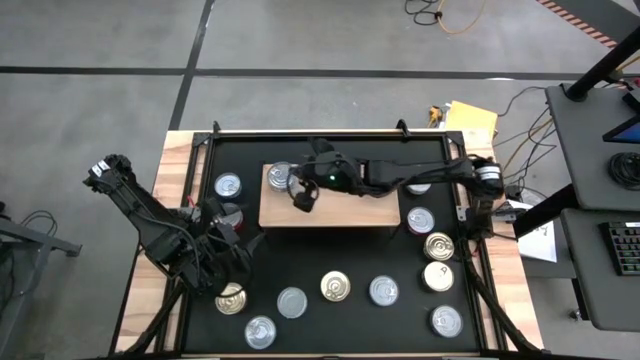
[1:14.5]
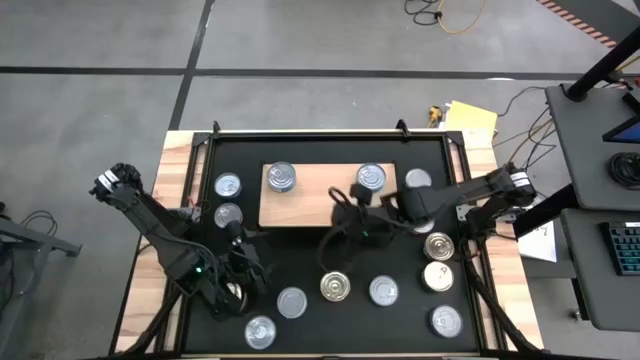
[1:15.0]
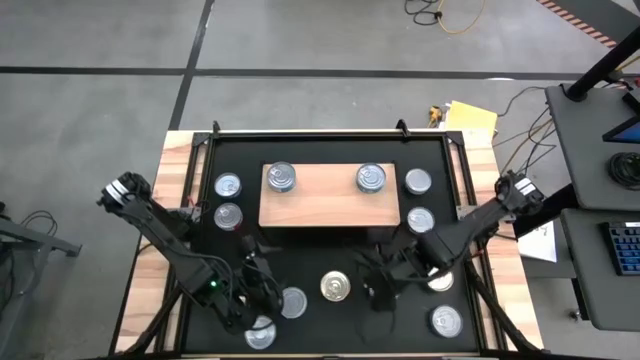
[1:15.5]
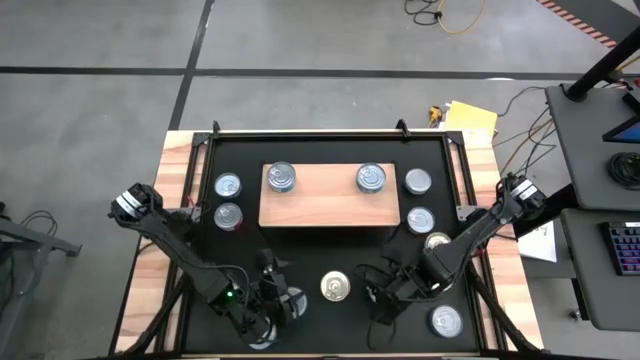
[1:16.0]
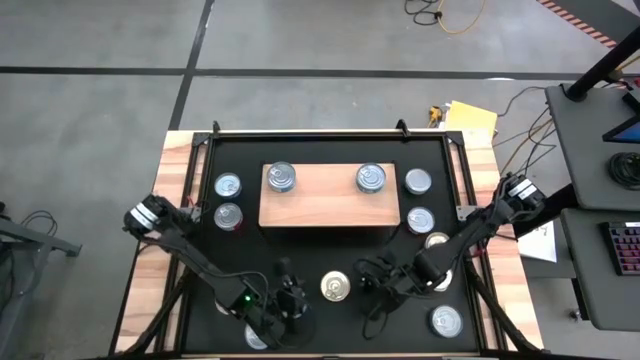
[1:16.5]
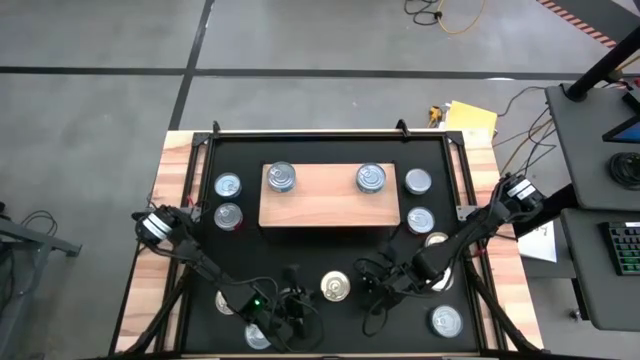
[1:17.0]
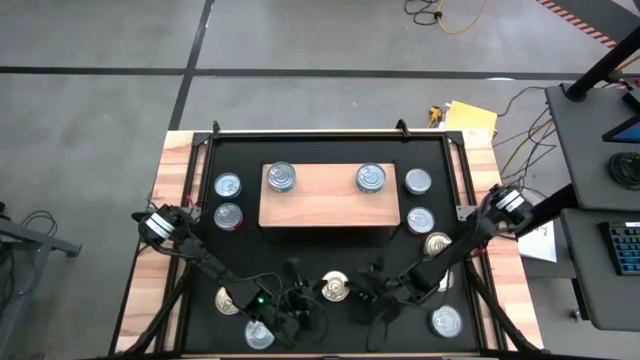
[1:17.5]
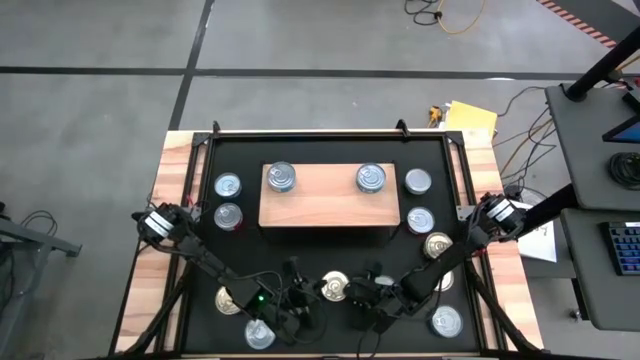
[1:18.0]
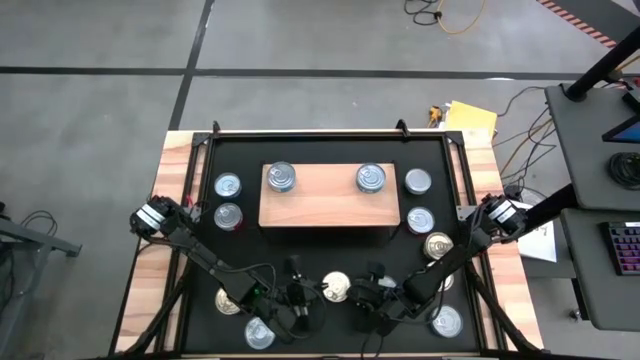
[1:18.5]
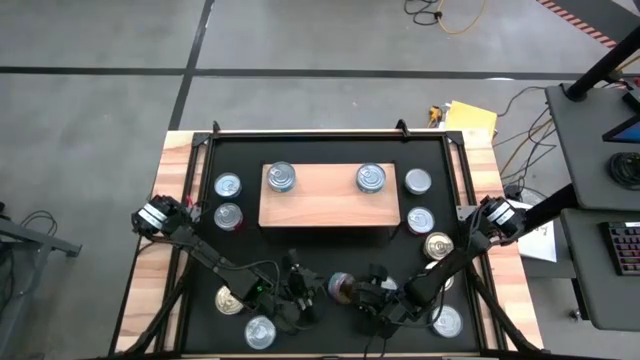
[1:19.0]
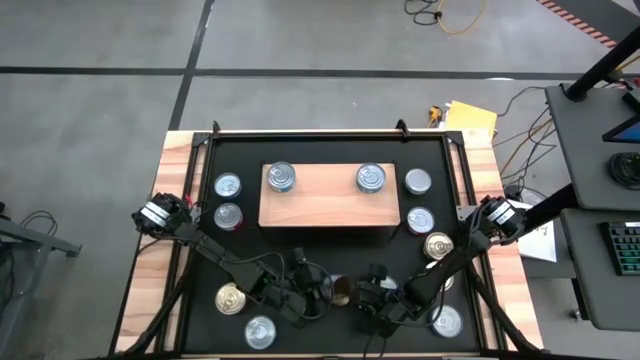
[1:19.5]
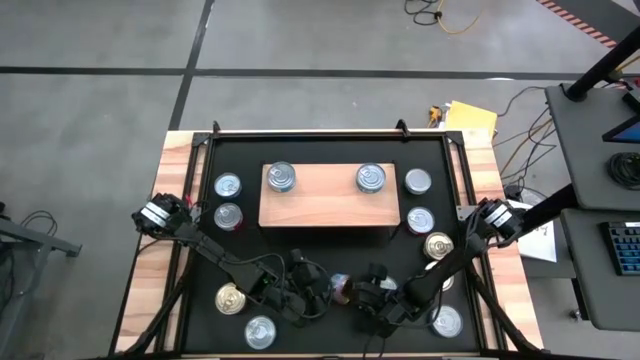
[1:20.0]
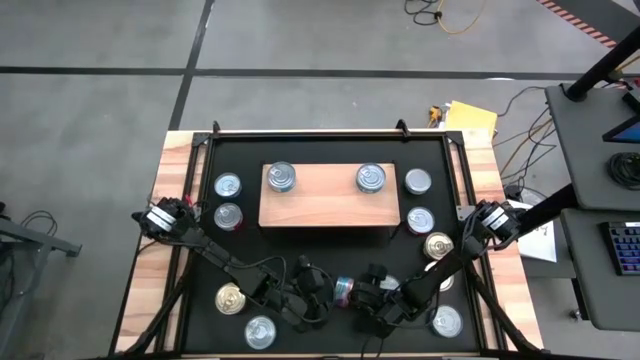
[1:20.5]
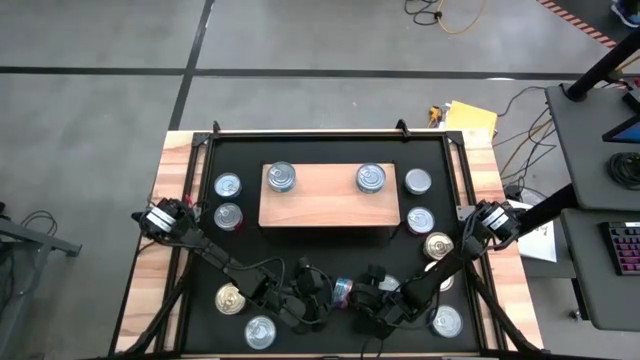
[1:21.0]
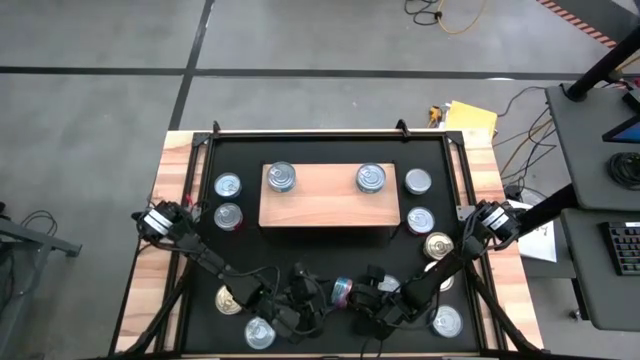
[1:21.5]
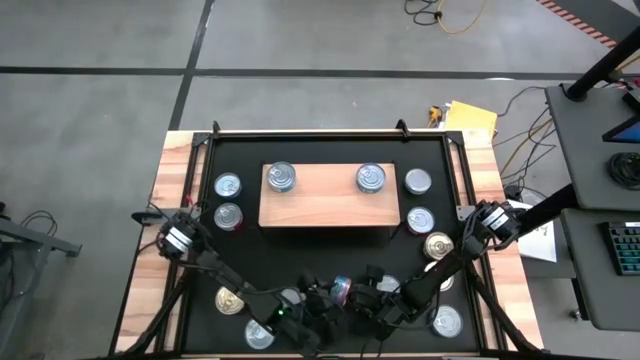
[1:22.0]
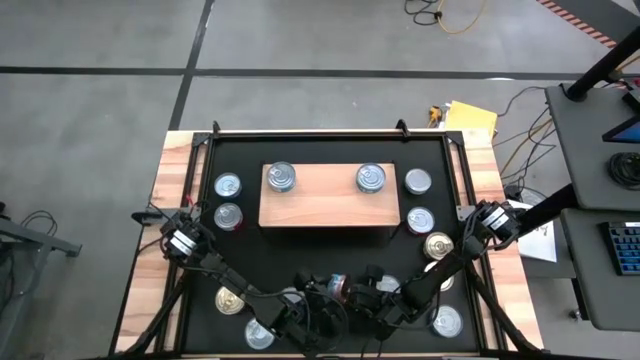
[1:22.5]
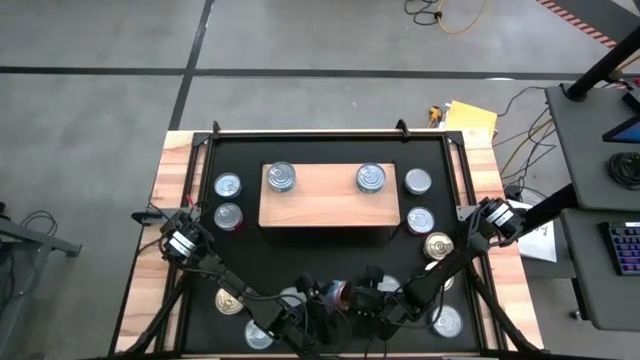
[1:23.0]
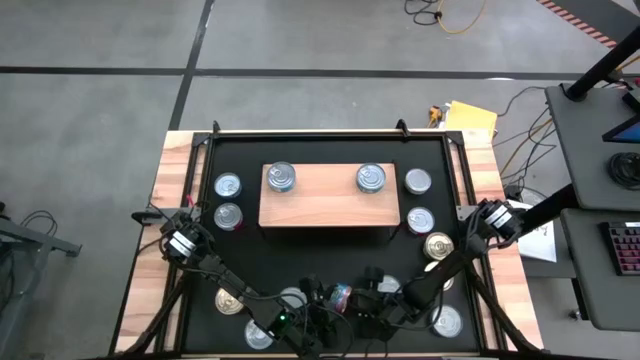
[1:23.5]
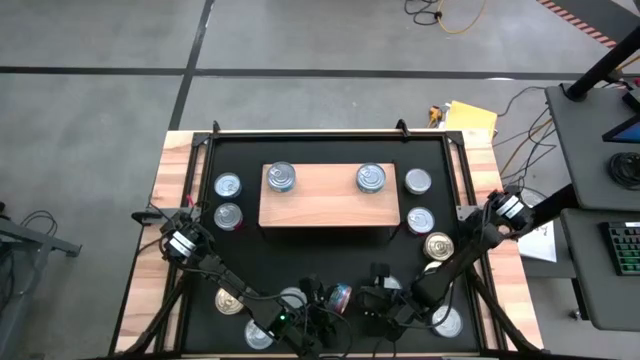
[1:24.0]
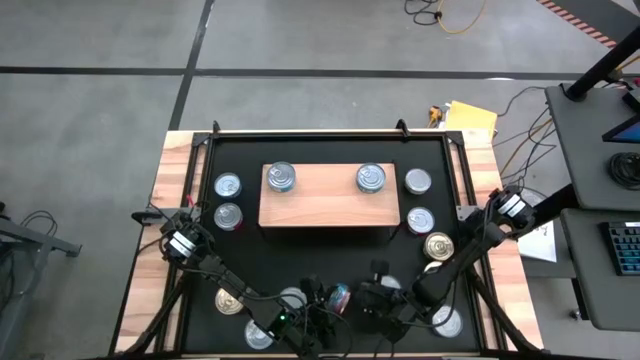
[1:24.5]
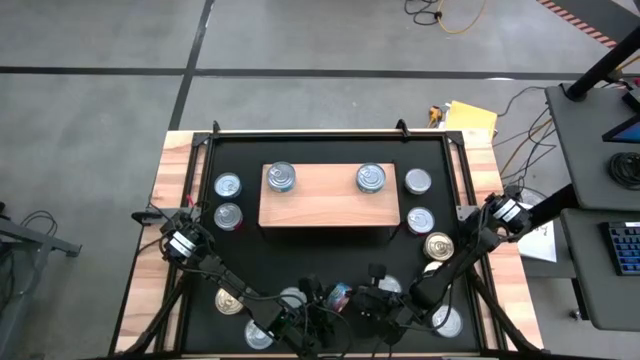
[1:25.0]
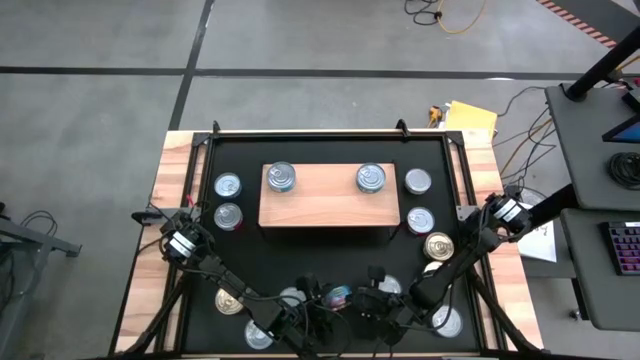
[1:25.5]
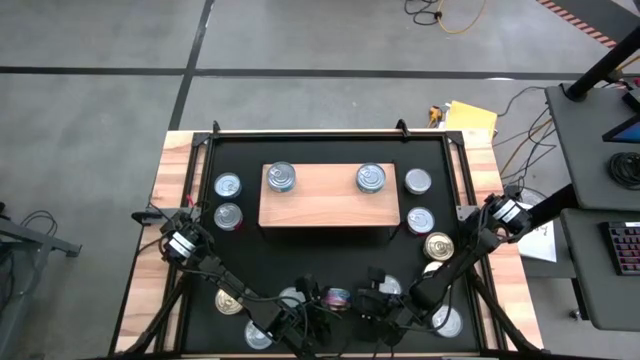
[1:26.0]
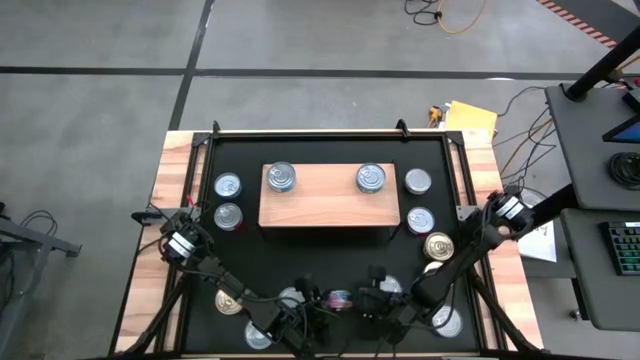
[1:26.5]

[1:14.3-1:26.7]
Task: Stack canned seafood by type on shelf
Put the blue tuna can on the shelf

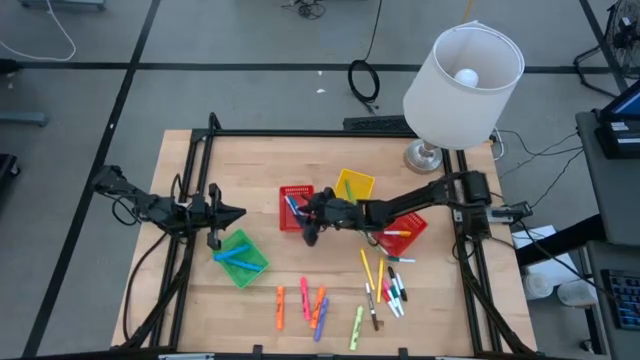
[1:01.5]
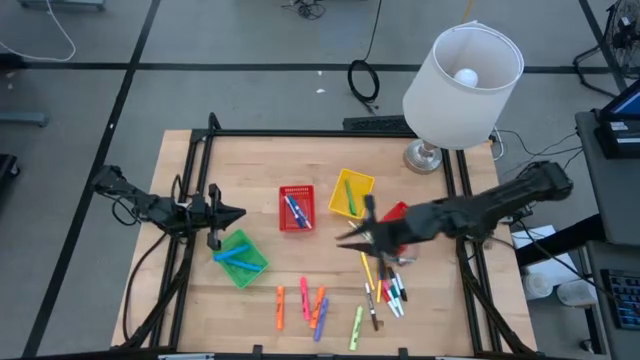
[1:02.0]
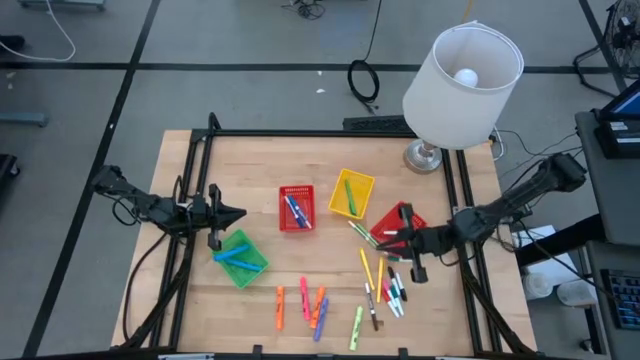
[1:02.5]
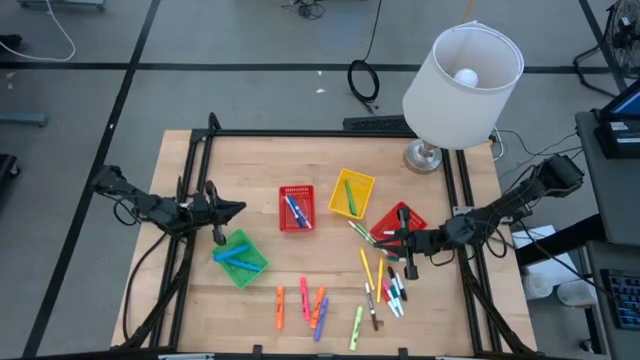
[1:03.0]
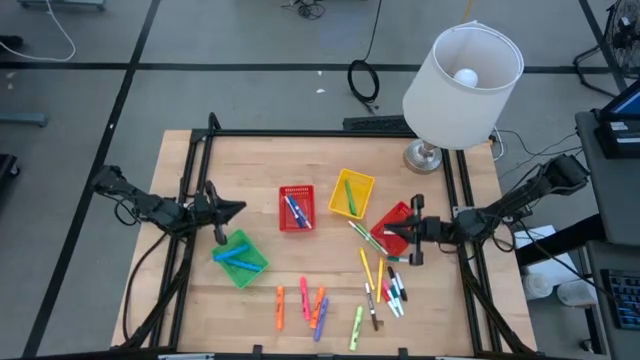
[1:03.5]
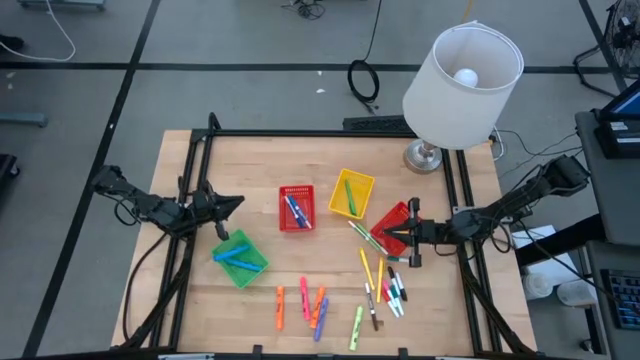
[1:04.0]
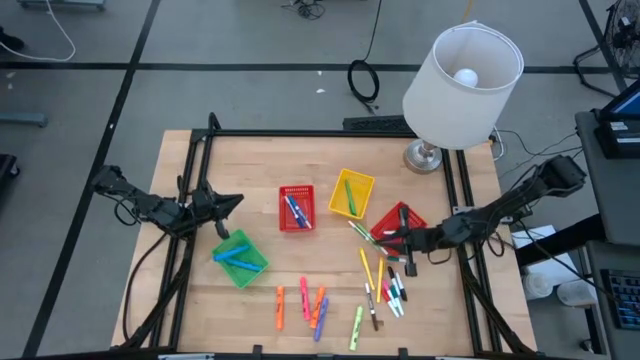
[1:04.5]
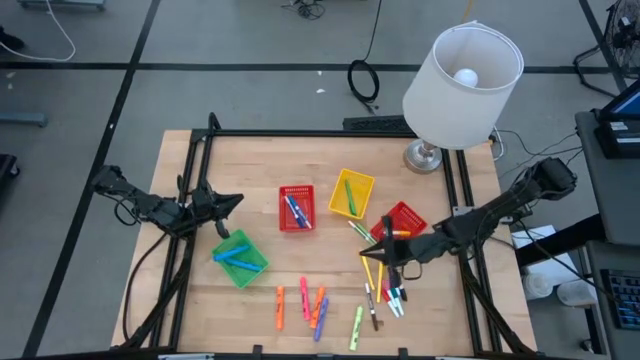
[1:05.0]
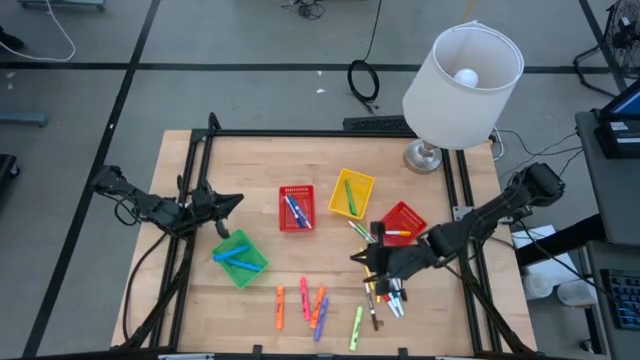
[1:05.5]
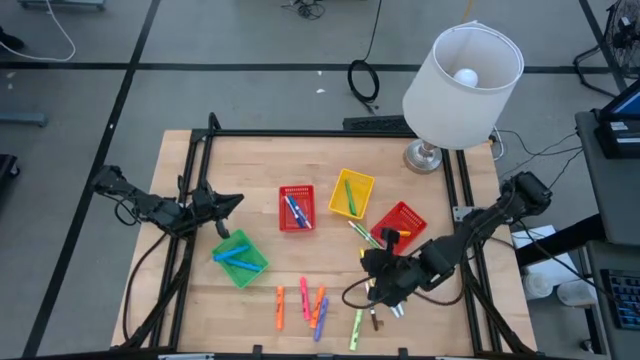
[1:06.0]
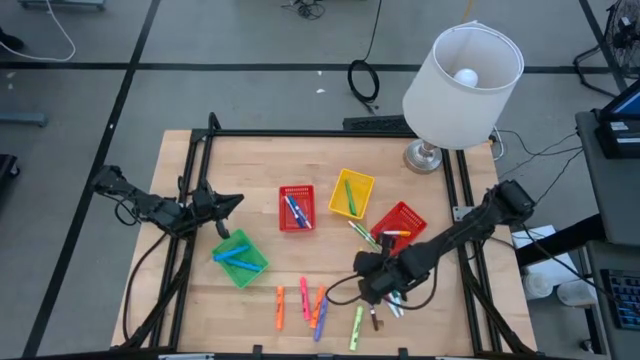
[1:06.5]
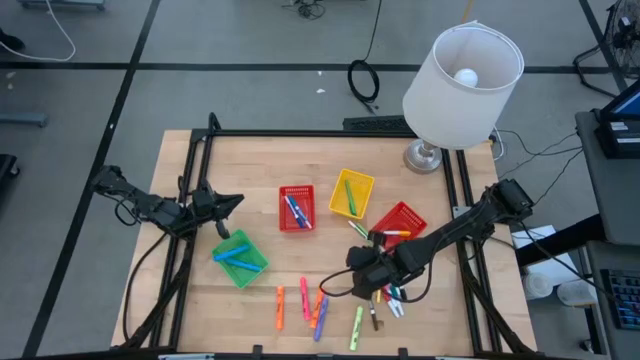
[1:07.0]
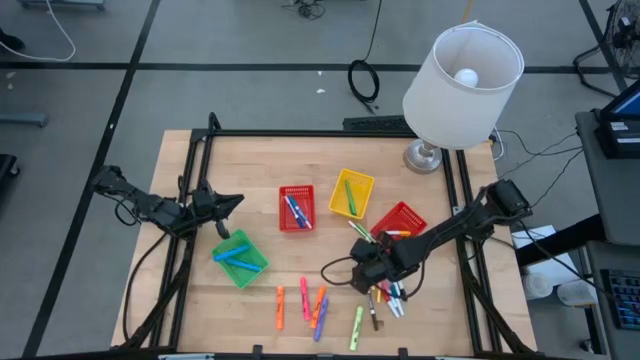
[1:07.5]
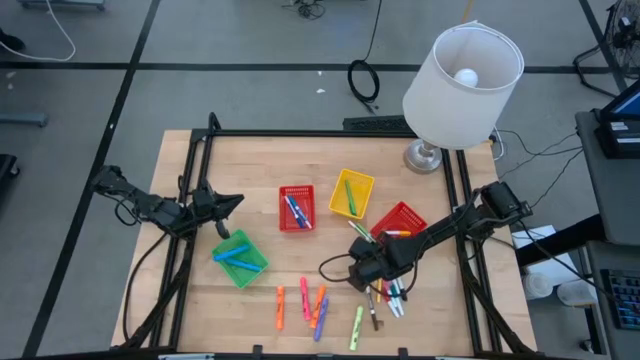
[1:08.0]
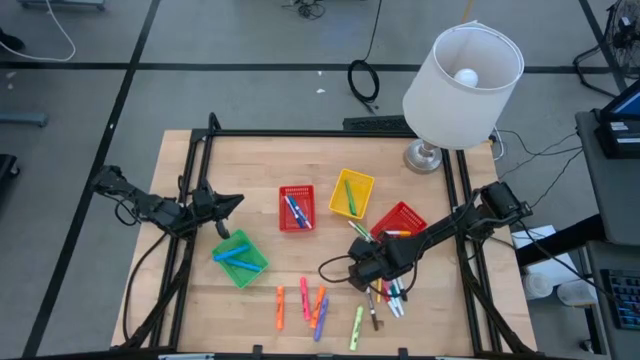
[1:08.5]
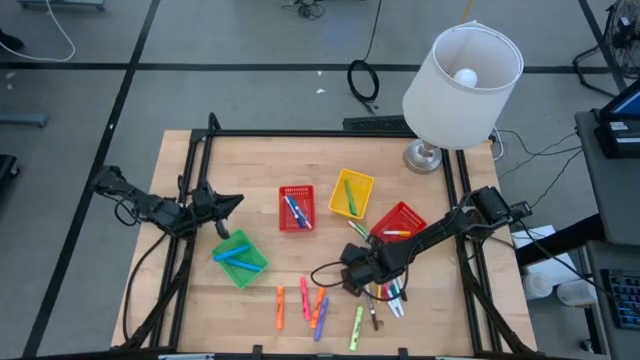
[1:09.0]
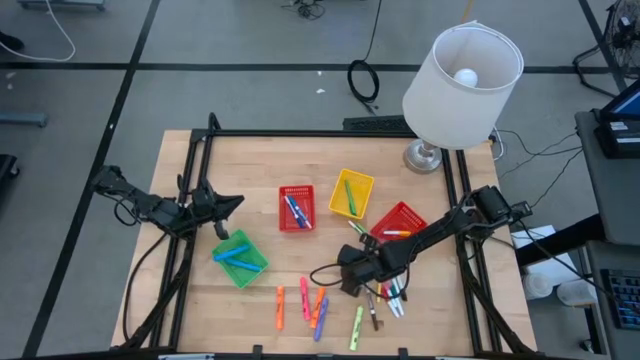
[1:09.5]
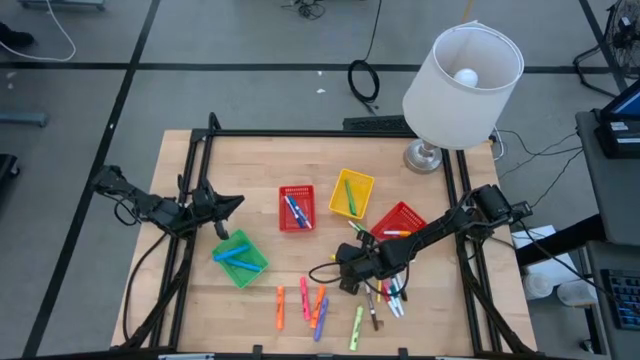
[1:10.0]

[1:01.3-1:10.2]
Task: Pick & Place Markers
Put the left yellow pen into the yellow bin
